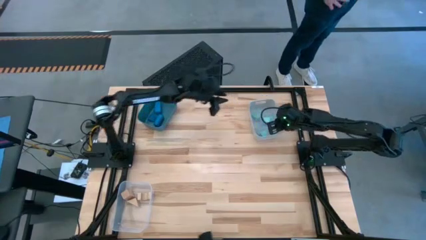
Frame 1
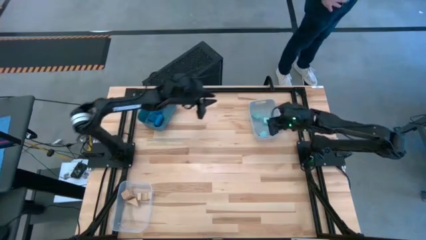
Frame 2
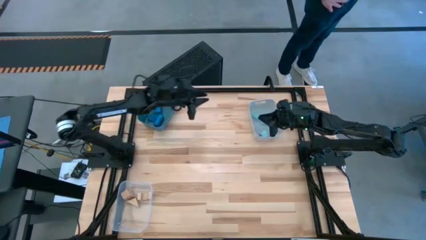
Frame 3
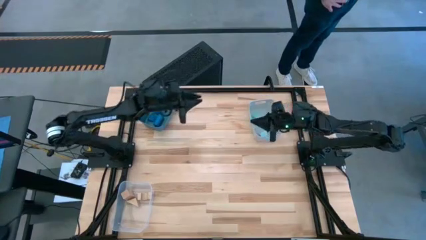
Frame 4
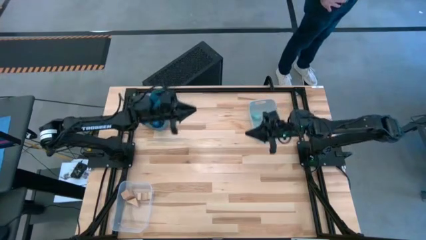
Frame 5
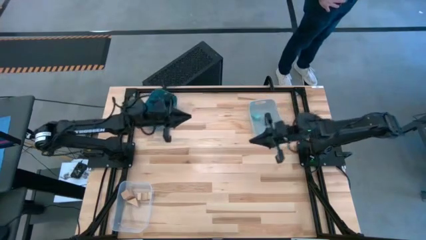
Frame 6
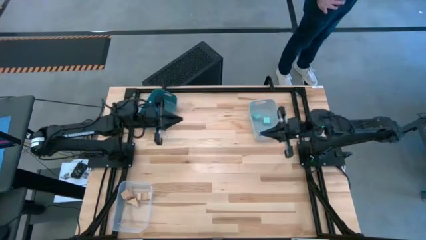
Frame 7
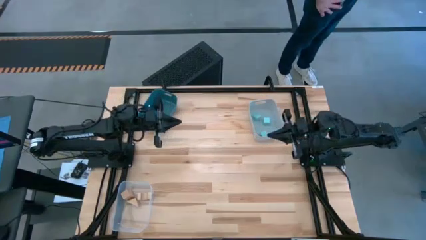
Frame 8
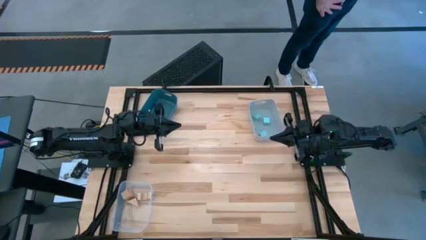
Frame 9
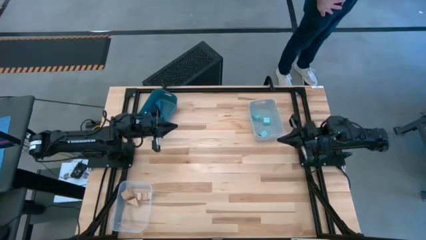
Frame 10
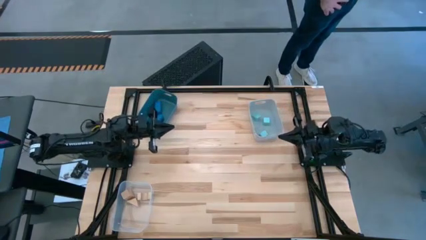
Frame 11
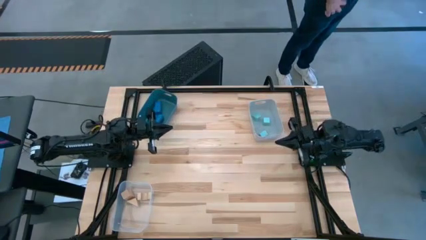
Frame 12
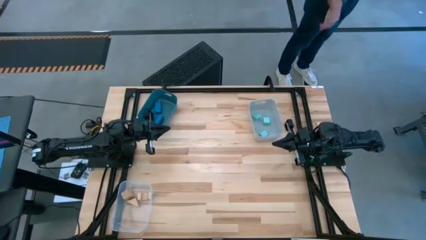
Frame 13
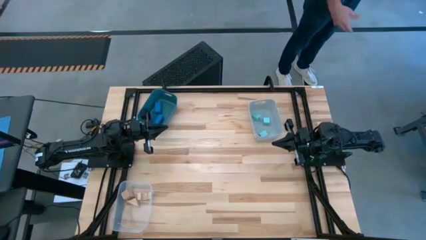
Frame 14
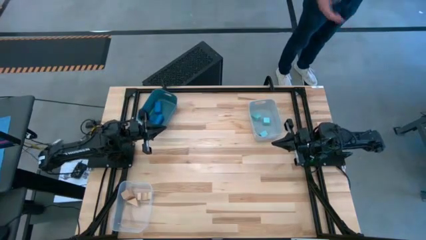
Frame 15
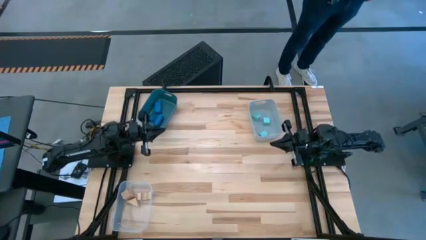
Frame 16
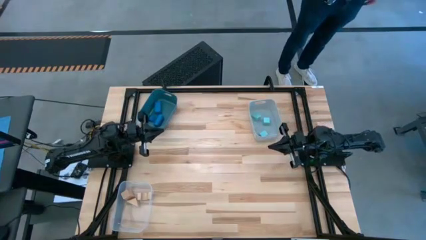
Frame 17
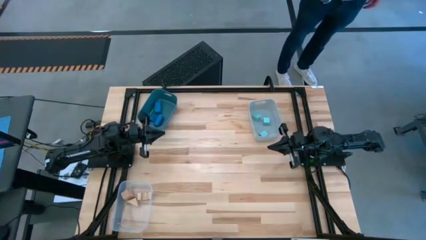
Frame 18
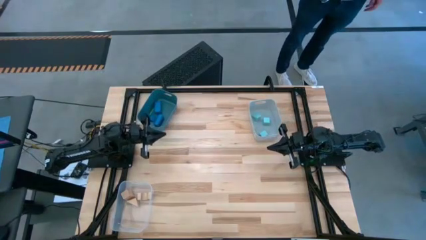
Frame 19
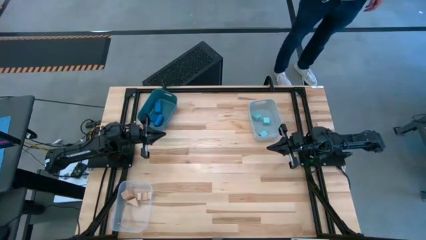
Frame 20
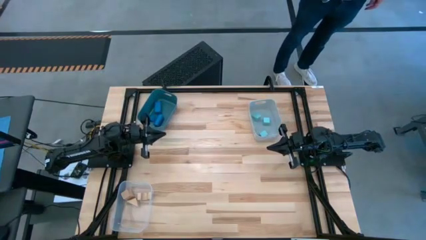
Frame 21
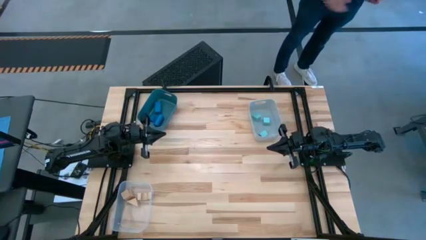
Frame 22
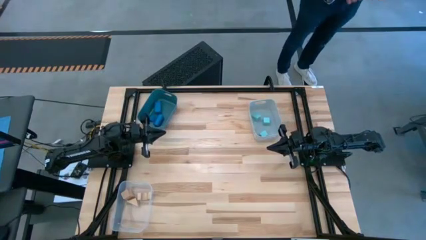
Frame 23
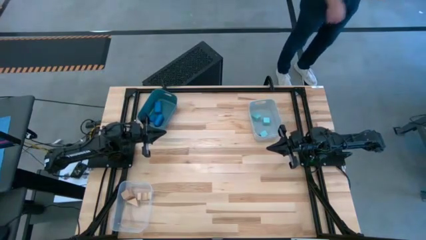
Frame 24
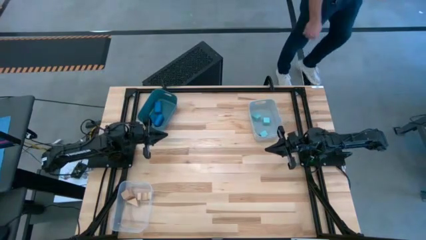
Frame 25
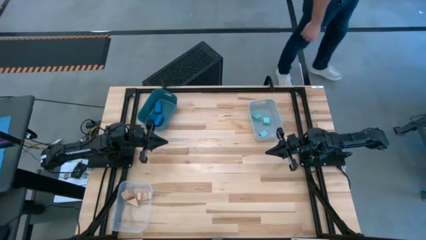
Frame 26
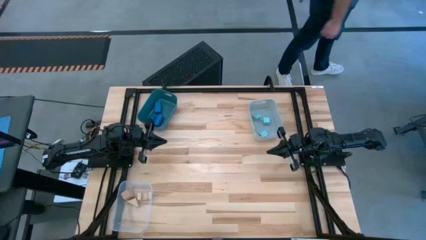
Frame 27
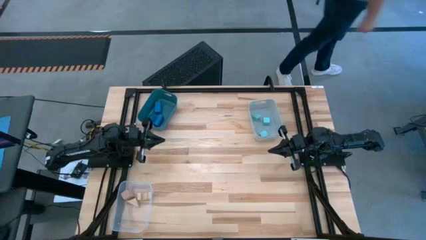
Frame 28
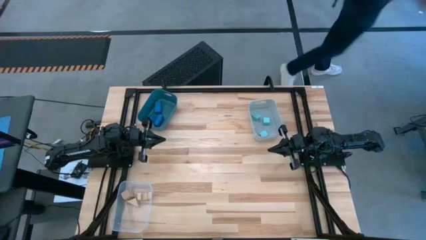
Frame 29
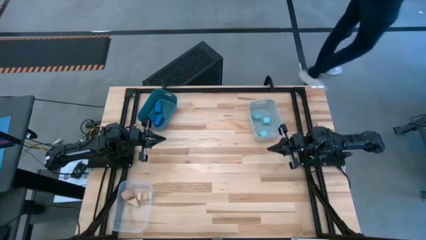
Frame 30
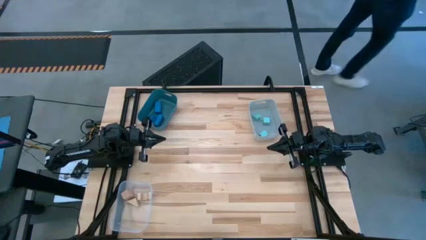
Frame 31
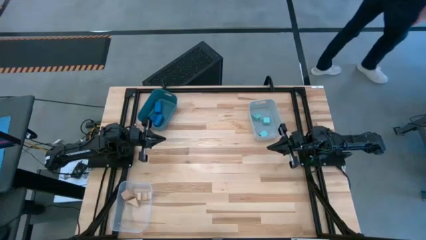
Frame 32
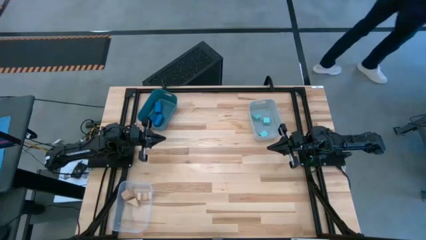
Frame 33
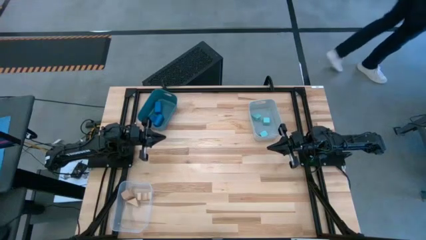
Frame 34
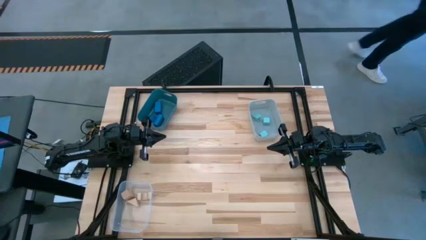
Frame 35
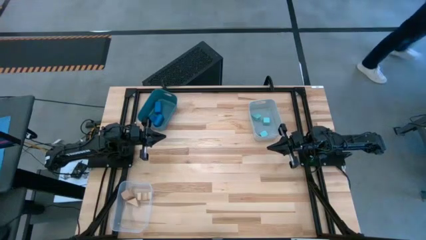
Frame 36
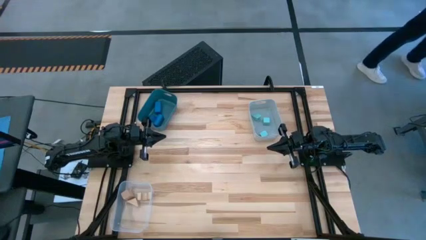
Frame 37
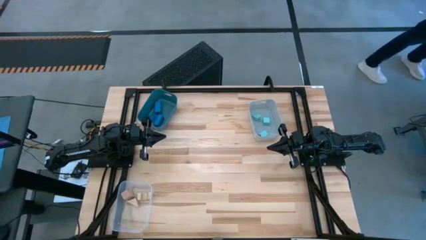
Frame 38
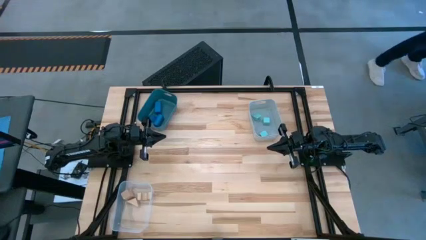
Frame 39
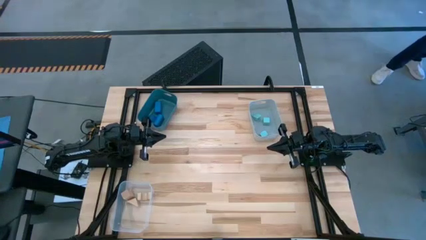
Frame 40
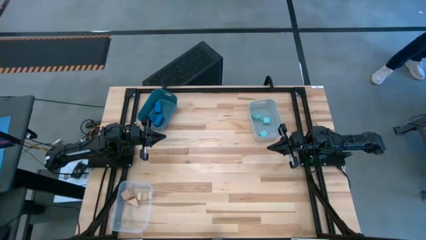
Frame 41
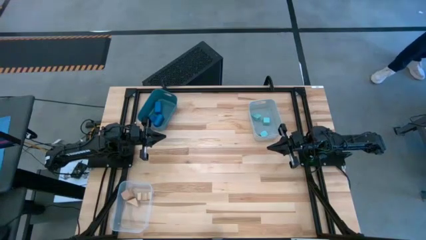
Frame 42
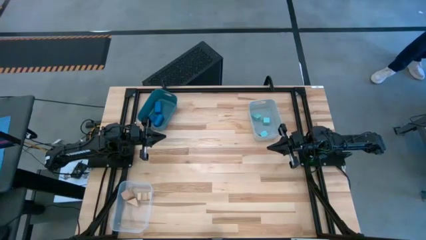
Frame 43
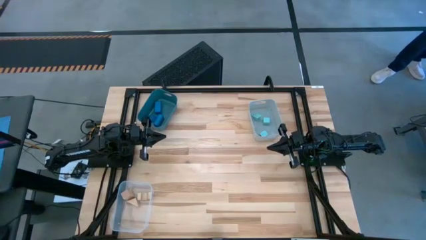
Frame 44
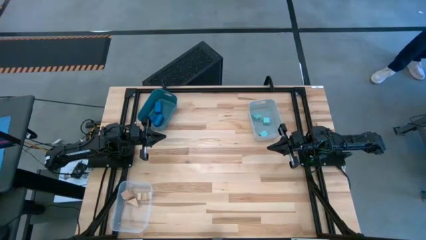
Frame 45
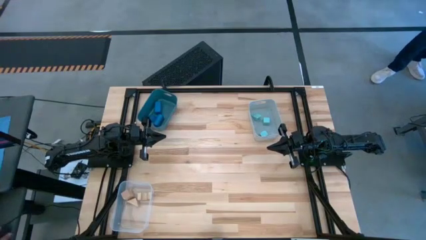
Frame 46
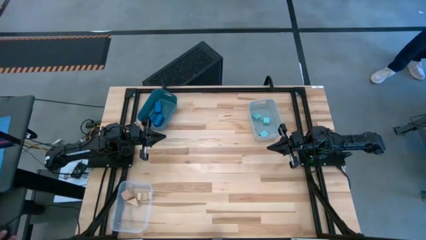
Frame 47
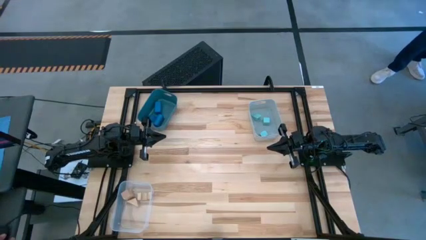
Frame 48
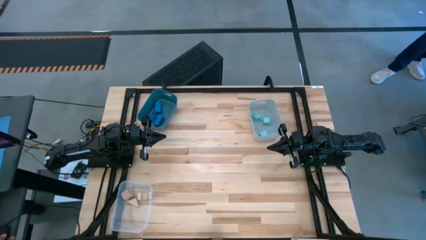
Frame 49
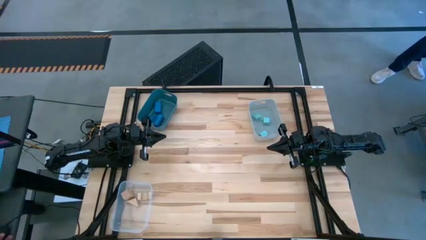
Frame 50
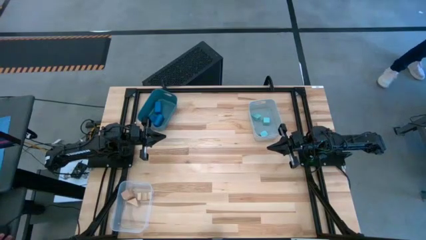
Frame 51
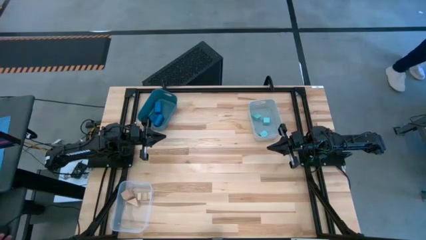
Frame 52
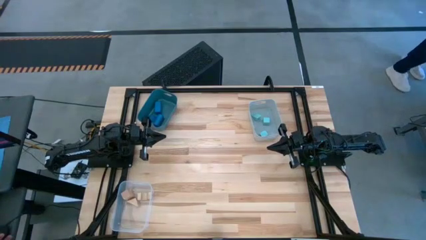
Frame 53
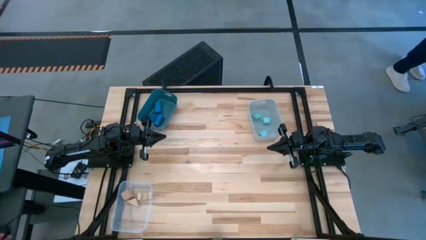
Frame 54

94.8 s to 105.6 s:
Task: Sort & place blocks by color
Return to Home Position

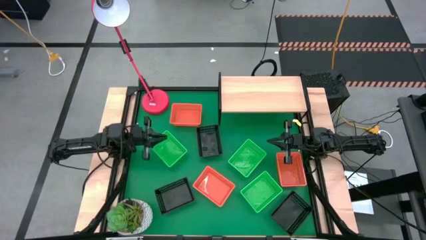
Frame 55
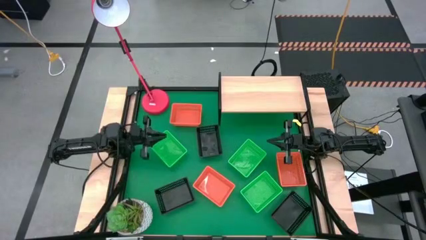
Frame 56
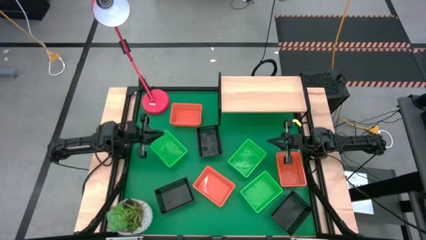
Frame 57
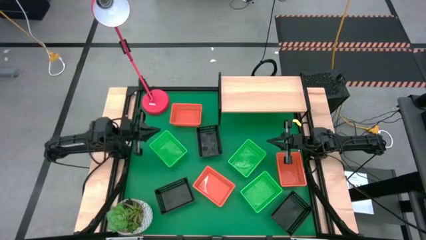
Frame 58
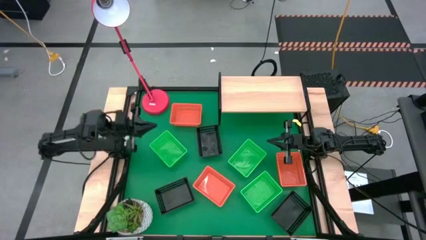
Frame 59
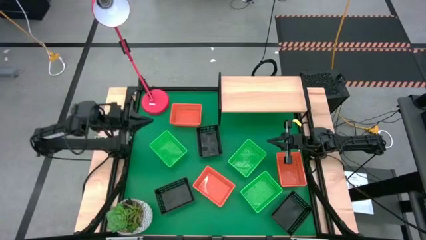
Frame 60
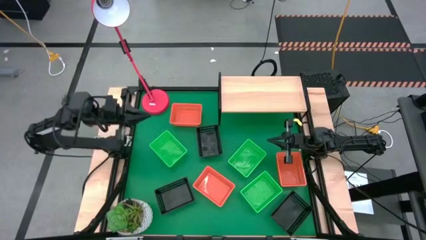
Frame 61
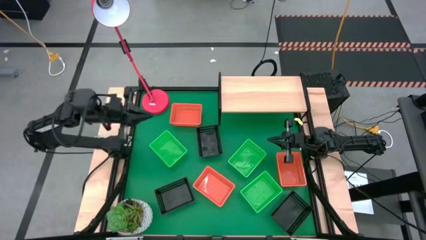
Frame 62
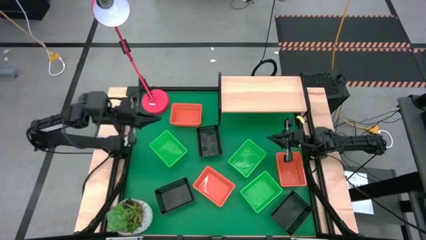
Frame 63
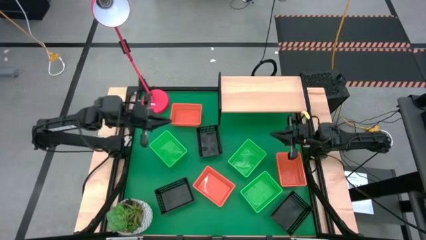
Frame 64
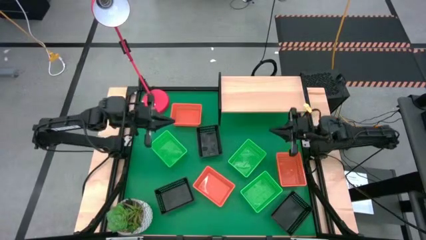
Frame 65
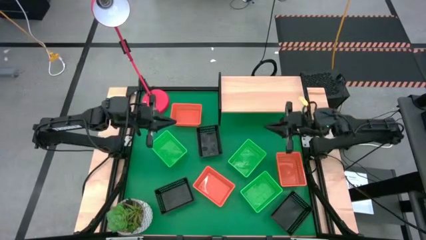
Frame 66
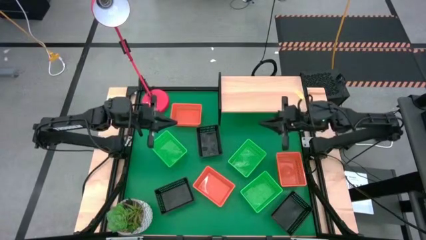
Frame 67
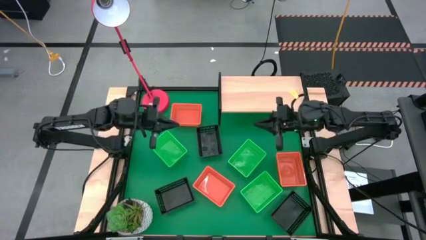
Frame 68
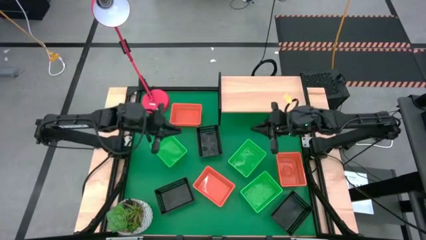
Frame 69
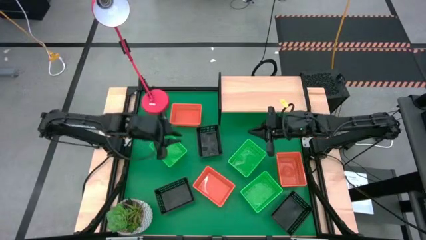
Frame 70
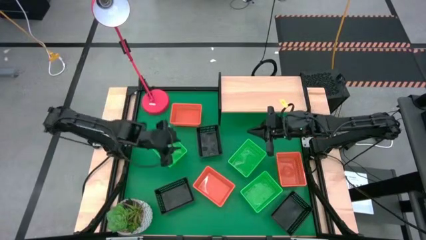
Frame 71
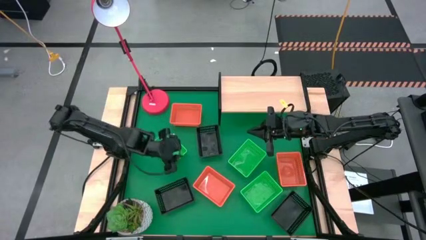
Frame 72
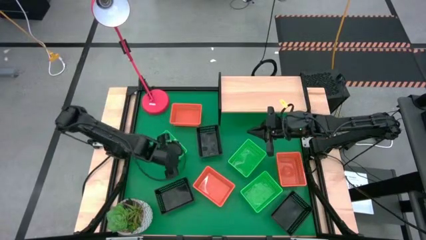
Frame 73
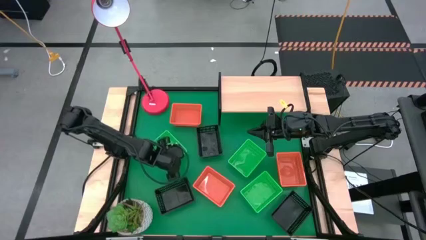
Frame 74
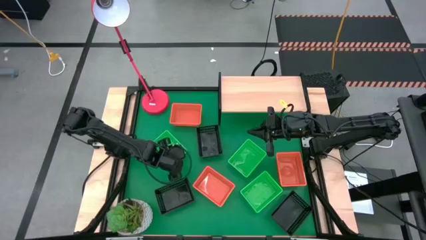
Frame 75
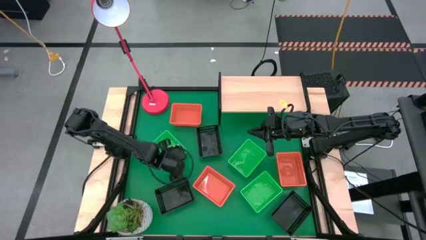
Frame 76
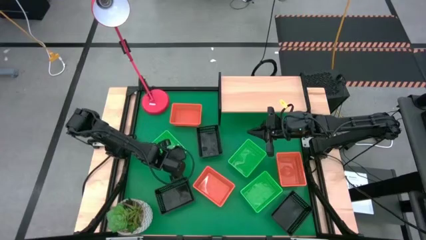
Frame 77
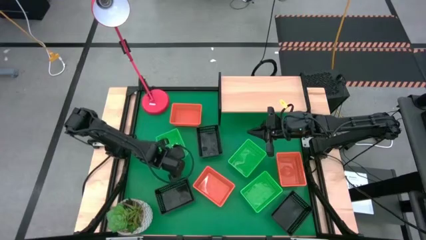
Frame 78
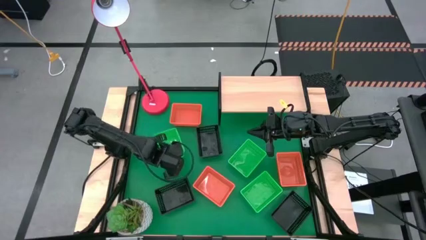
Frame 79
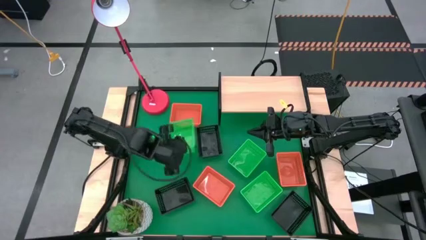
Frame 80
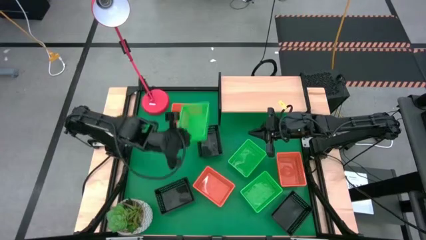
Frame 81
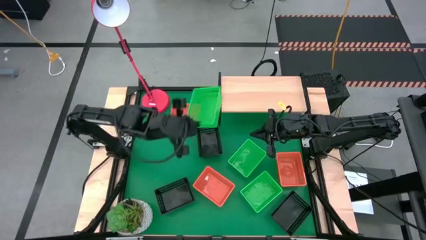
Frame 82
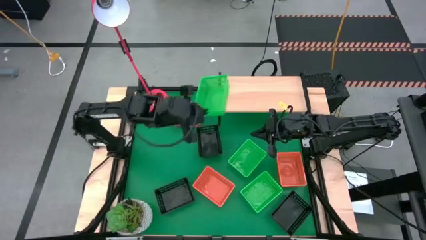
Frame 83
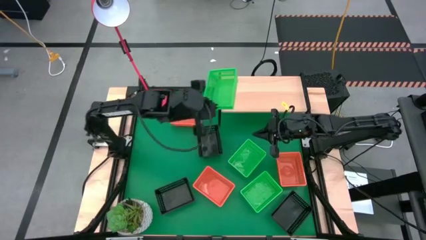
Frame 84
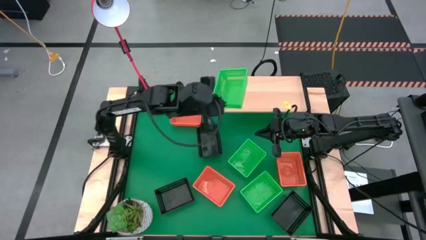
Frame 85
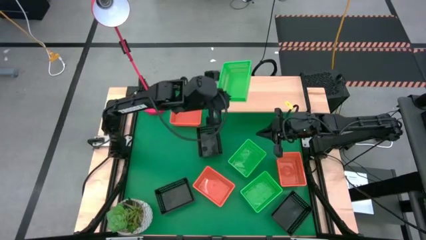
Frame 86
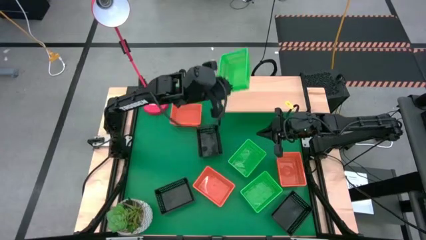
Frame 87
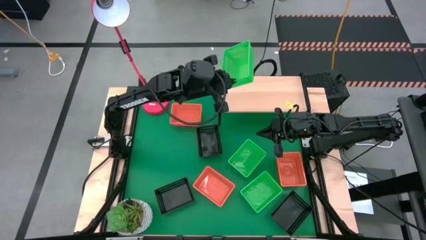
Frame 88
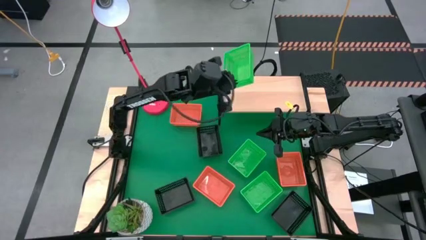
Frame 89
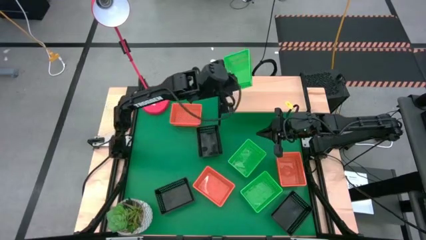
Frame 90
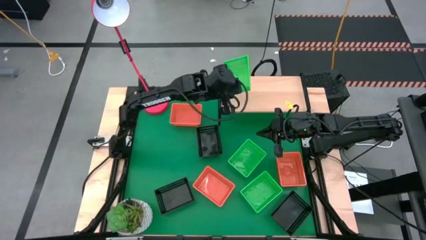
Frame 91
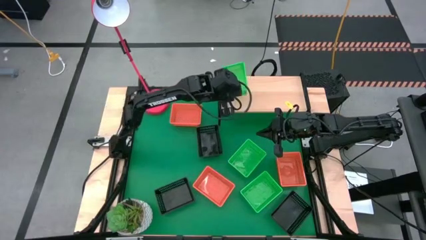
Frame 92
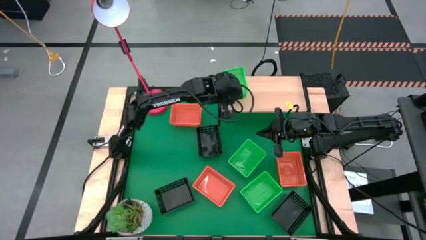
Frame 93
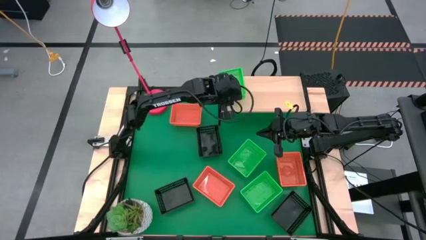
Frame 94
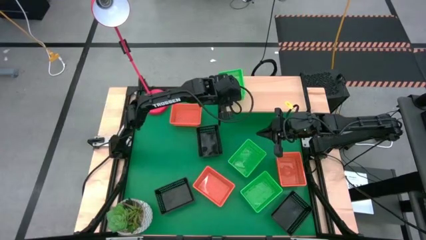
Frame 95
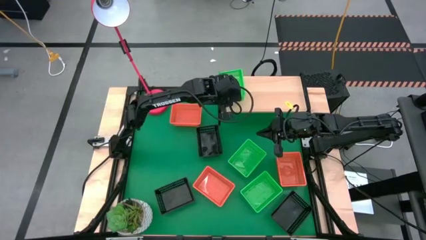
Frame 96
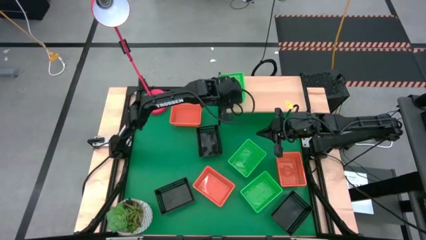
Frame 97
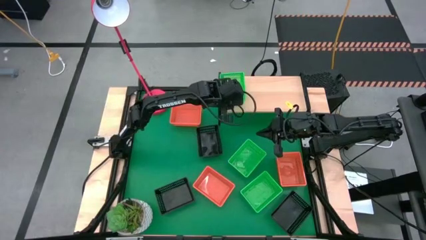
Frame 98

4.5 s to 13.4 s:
Task: Stack baskets on shelf by color
Put the top left green basket on the shelf
